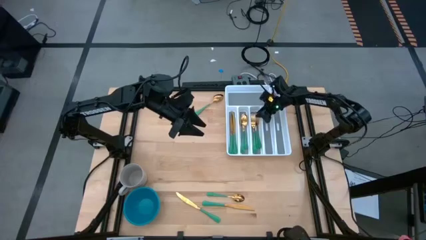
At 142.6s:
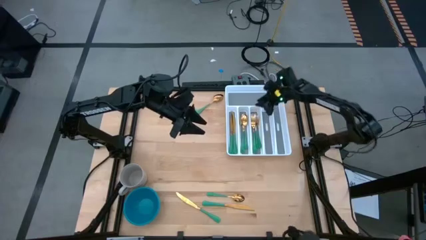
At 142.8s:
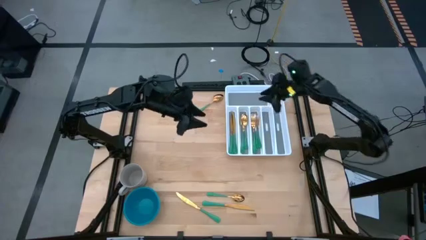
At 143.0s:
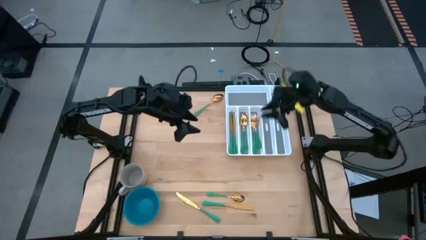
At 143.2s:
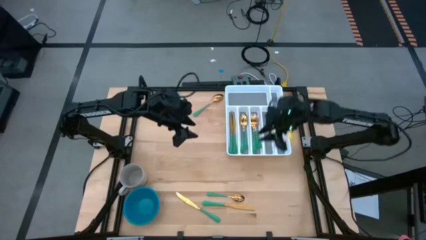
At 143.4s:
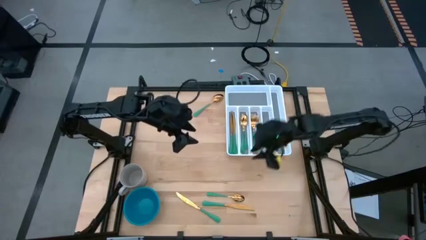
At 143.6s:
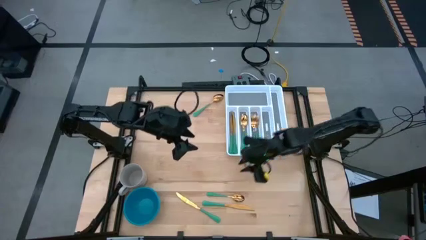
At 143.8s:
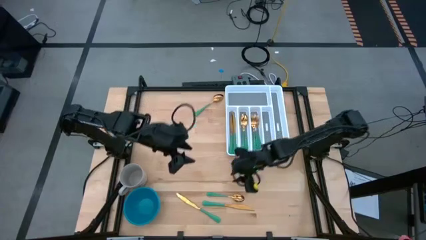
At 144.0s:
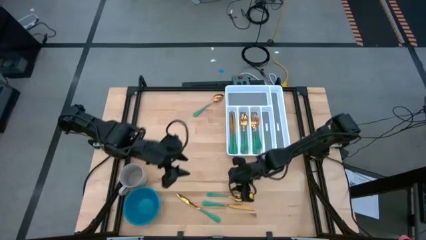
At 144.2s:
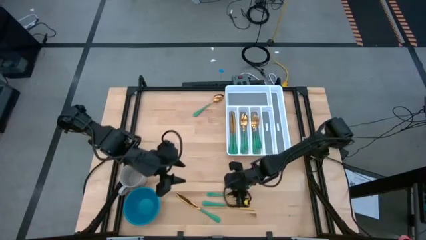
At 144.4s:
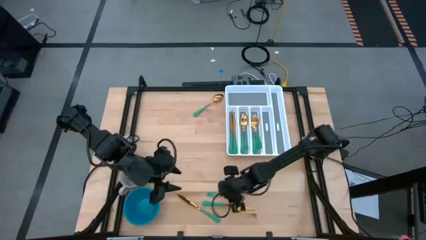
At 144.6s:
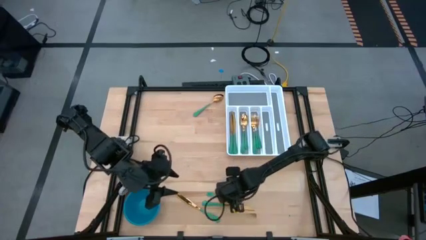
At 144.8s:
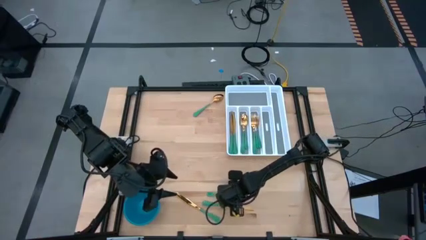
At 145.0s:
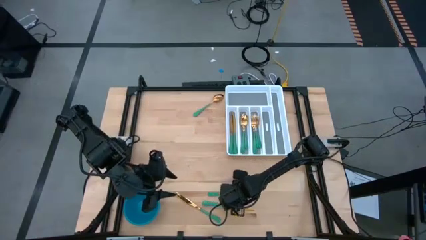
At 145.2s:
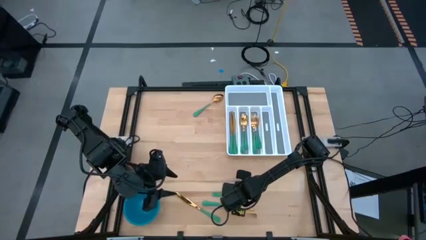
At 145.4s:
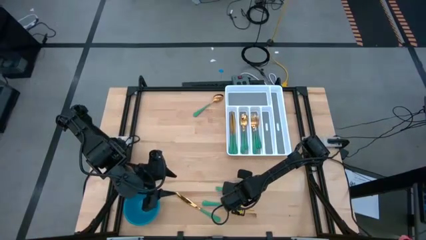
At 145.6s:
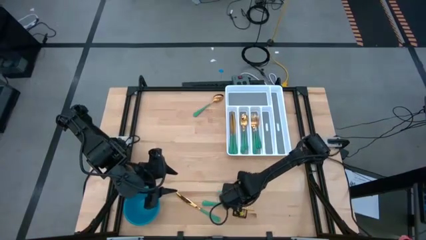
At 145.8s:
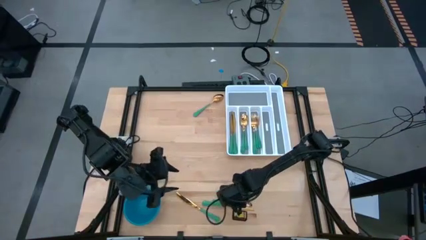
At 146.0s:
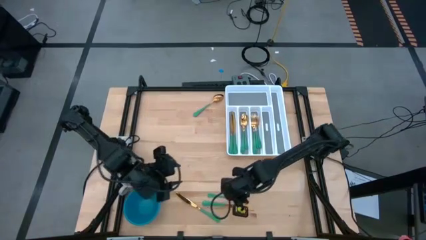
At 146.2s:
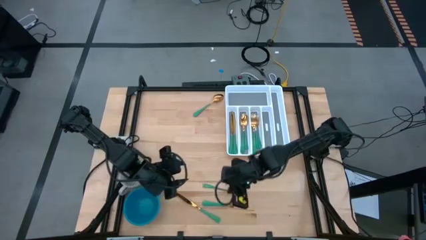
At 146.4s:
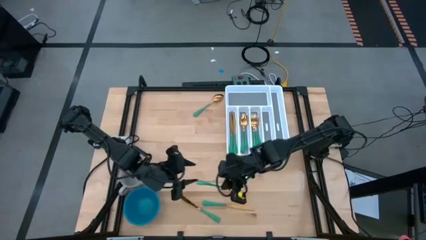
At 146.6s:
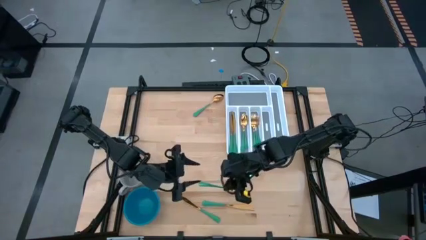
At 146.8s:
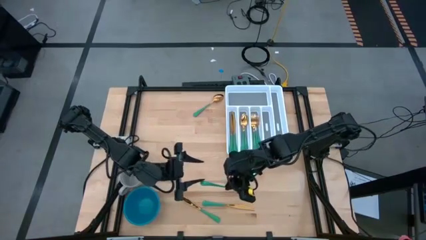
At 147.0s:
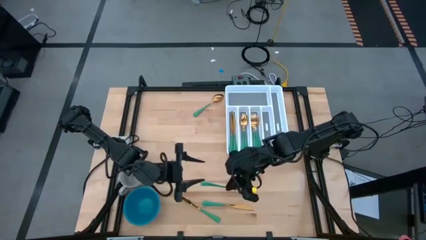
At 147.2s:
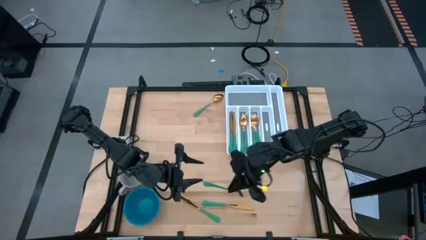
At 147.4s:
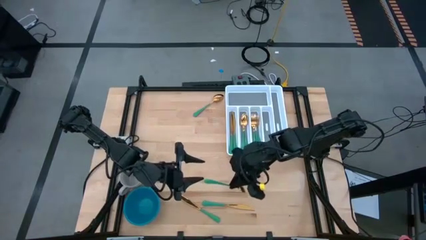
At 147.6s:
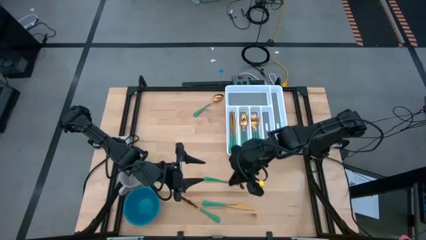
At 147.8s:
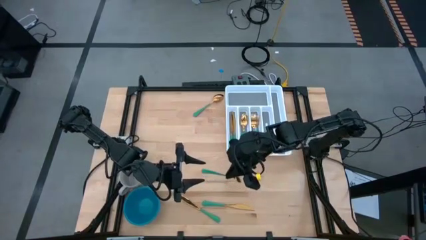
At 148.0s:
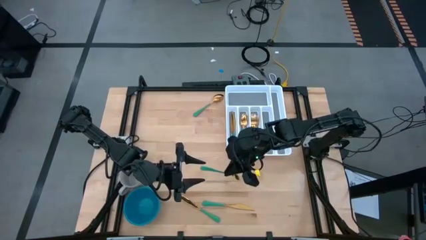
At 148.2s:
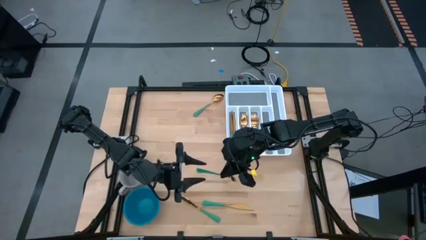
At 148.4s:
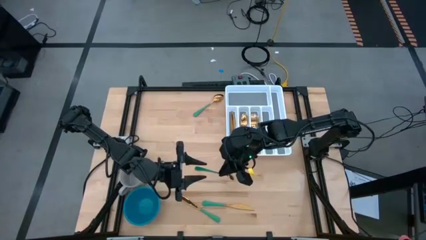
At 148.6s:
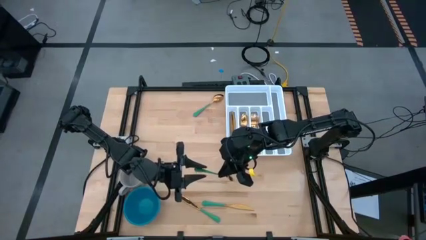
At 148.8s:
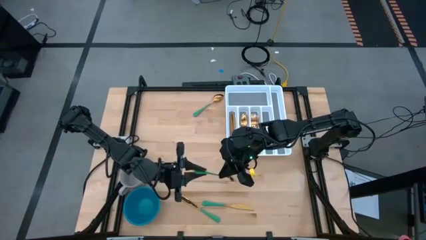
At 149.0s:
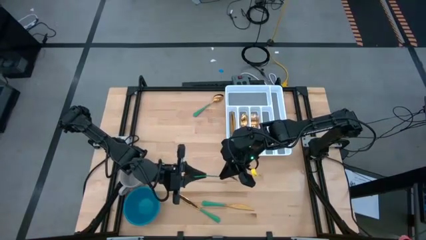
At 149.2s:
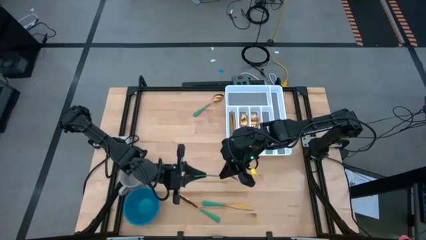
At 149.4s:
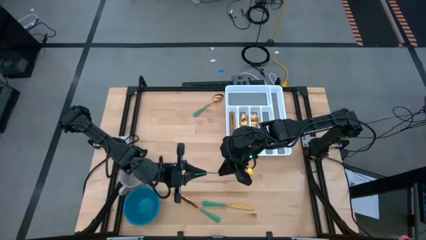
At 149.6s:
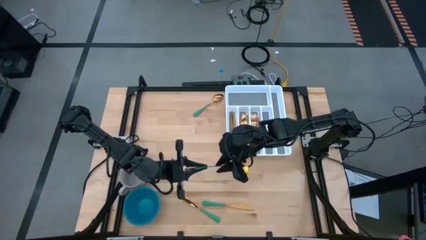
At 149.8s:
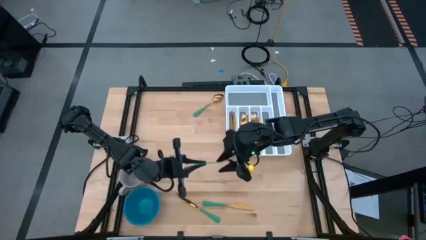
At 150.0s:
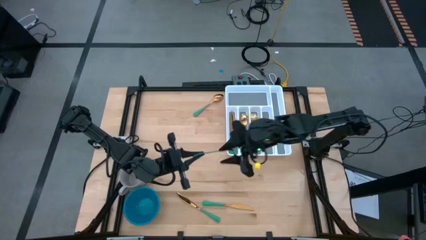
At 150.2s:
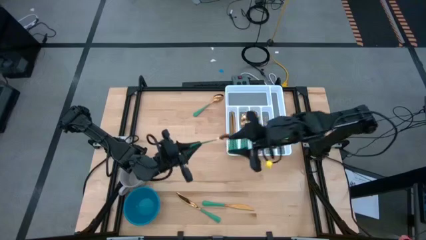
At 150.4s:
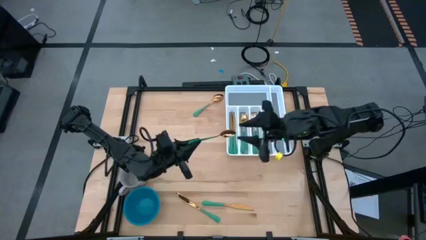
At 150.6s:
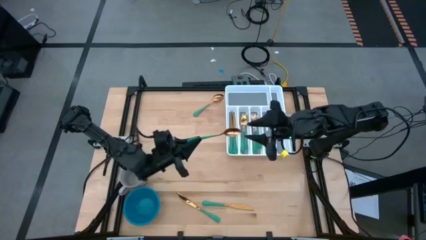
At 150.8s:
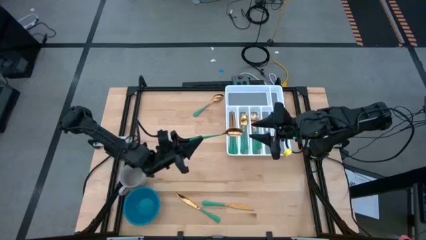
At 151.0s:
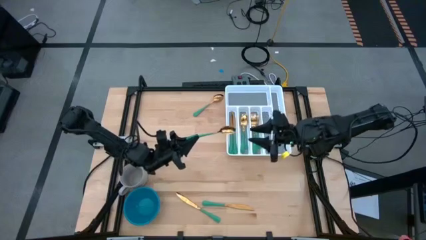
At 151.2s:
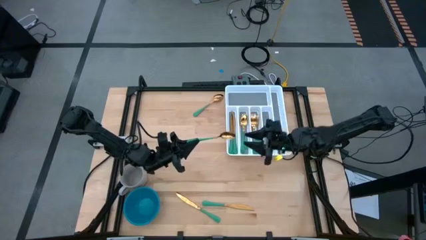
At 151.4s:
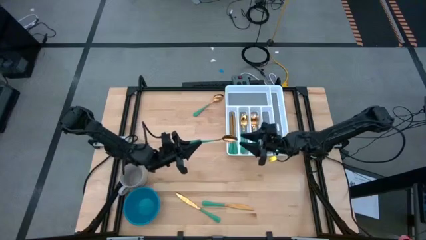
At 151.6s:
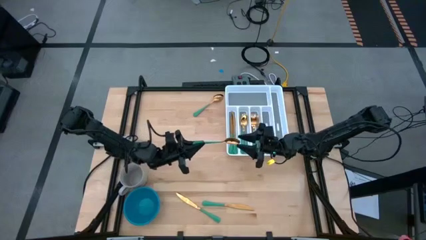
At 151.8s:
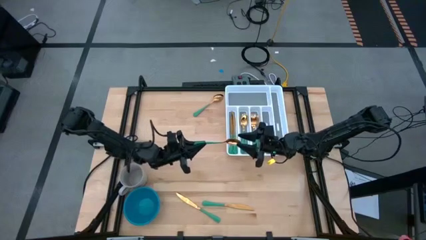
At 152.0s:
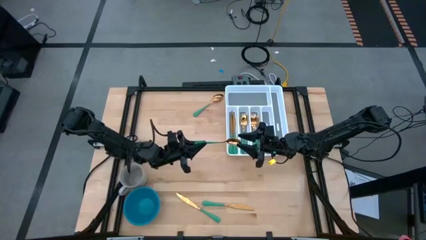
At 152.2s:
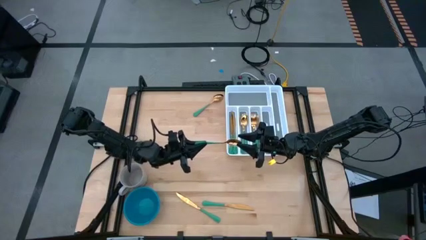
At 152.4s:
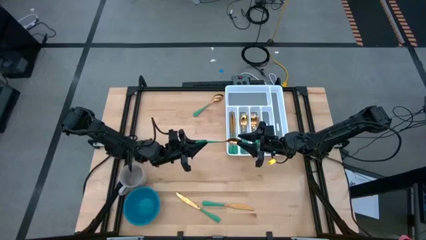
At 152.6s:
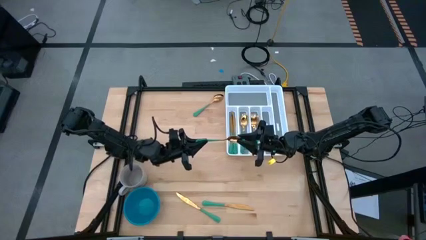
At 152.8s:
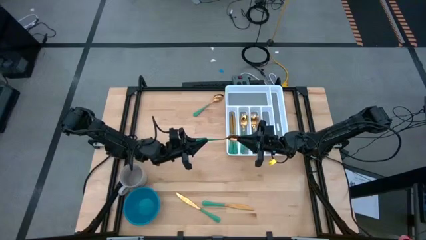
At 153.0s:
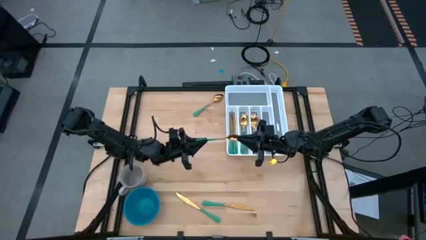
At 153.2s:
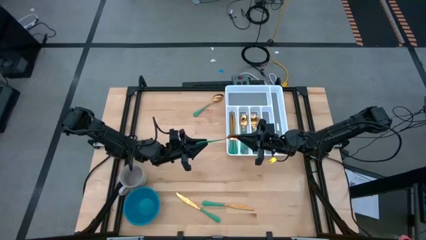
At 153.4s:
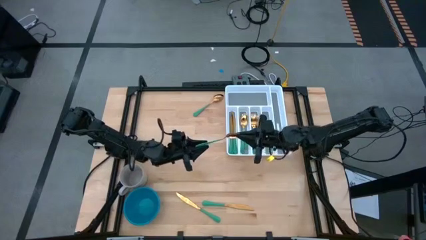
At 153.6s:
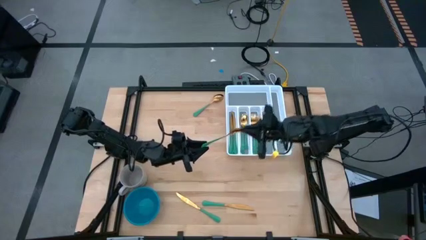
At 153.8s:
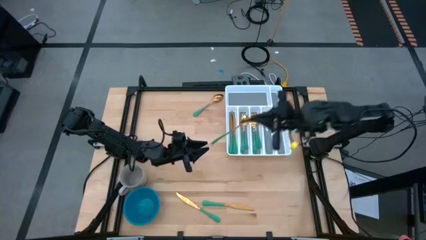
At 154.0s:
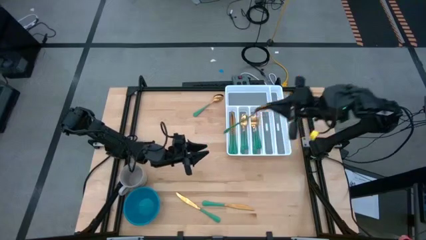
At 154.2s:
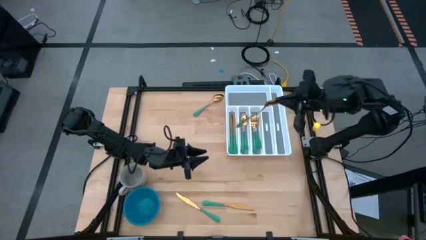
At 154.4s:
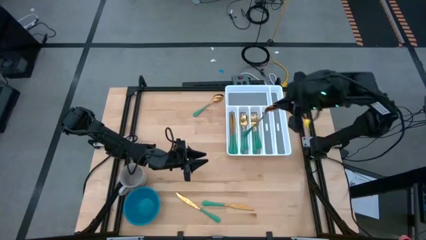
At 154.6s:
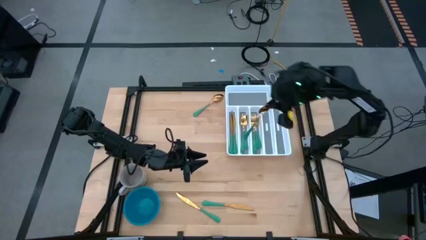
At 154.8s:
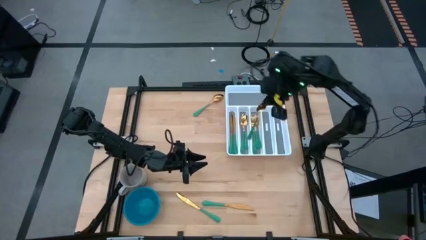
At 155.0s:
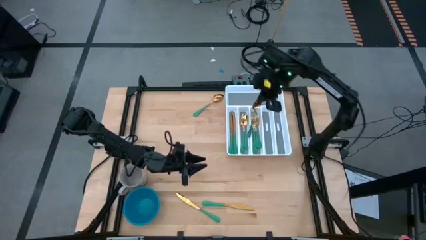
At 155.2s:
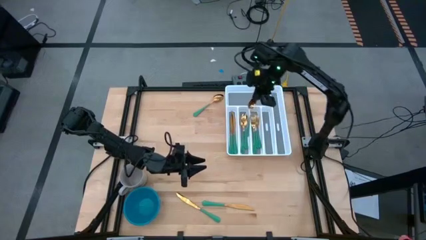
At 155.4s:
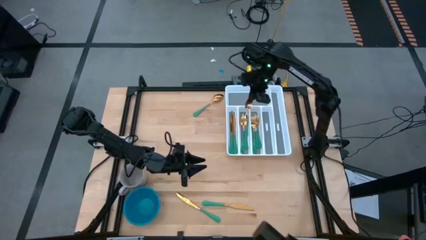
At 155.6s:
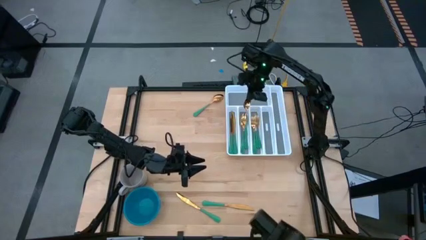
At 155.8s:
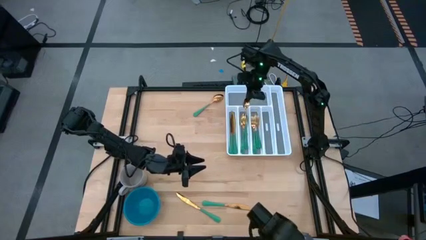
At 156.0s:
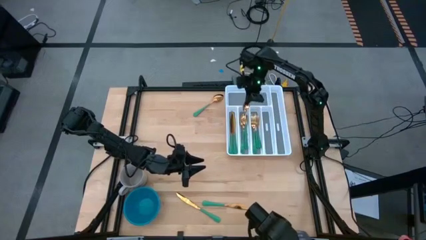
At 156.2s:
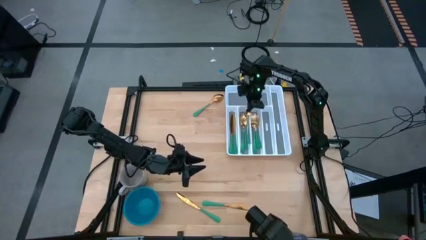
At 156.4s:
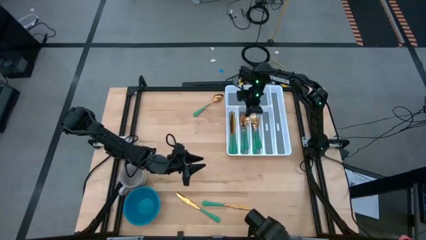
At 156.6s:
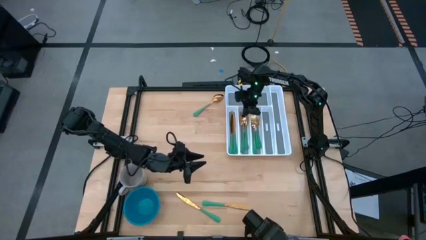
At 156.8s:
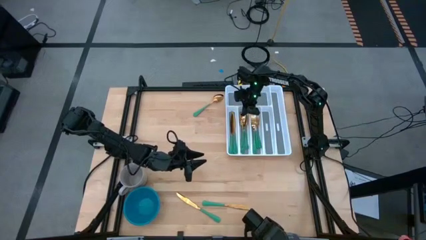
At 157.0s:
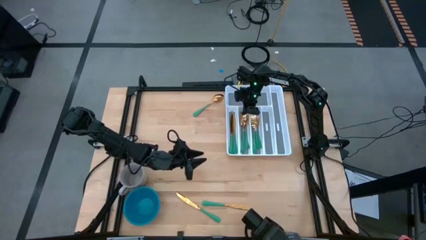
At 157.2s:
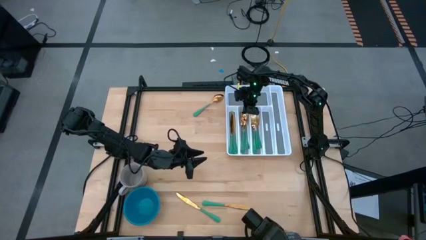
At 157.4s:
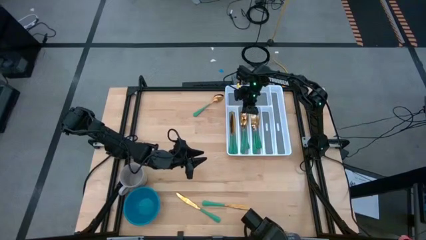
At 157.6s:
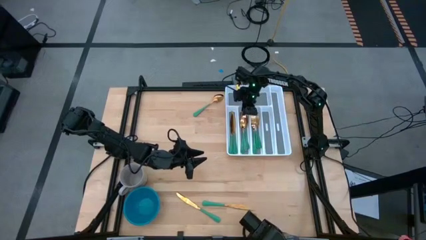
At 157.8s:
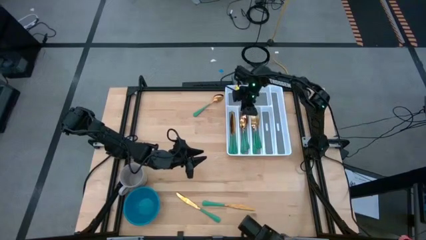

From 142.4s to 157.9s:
Task: Sort silverware
Put the bottom green spoon into the white cutlery tray

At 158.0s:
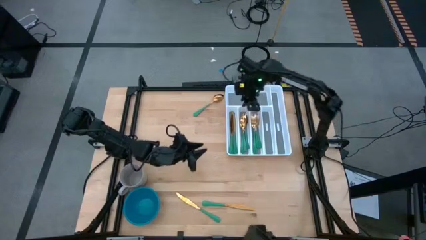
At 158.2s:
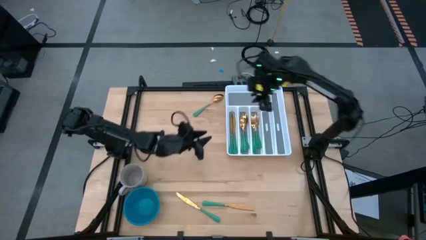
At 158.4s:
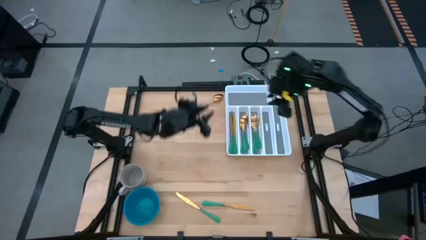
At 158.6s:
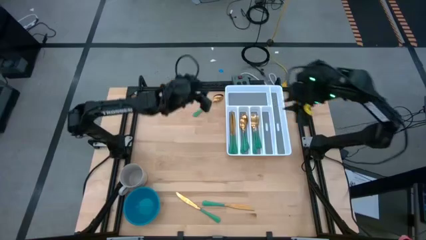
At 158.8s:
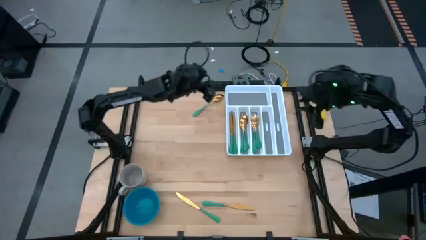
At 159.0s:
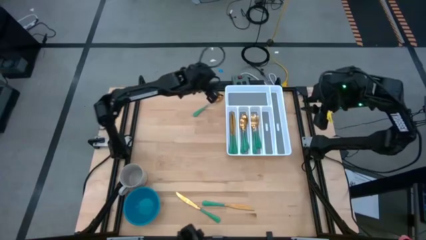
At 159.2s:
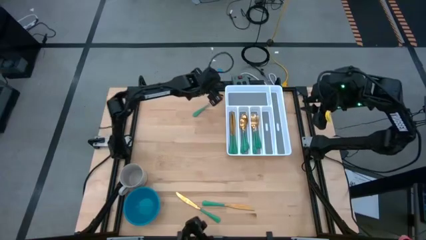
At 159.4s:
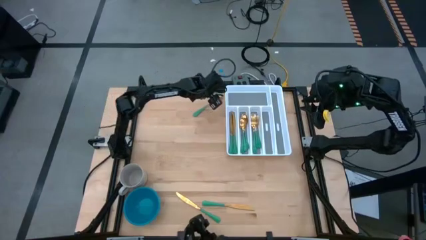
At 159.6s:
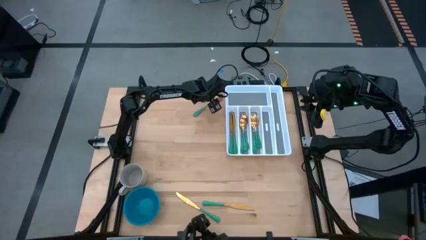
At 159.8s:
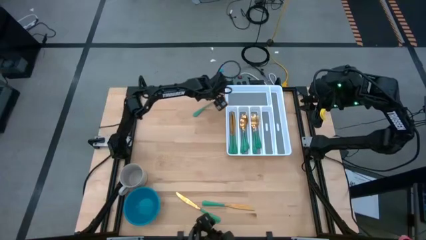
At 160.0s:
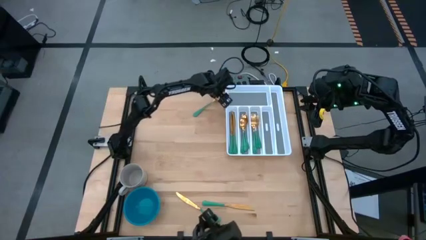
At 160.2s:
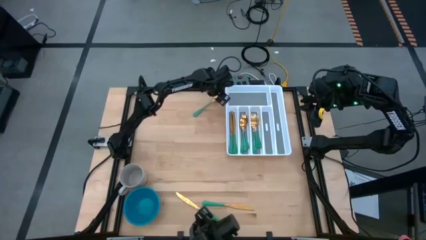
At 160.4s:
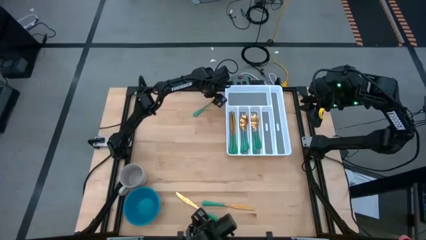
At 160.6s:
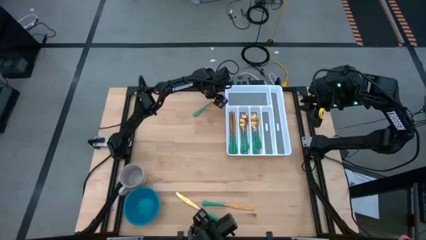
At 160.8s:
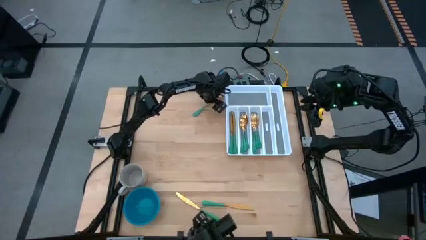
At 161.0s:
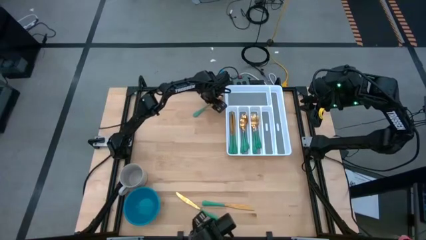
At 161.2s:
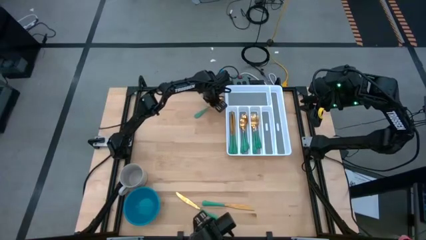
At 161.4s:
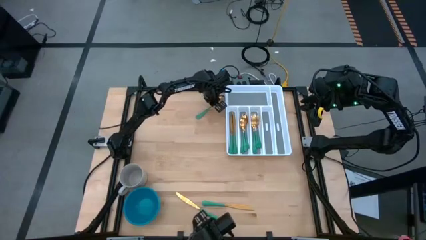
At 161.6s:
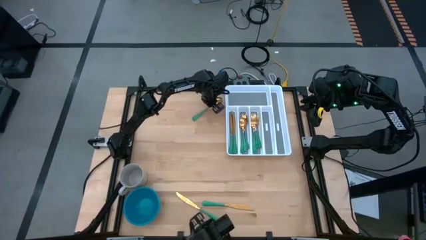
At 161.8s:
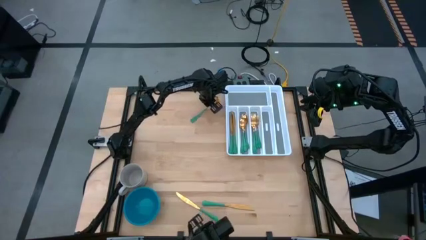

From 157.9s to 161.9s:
Put the green spoon into the white cutlery tray
